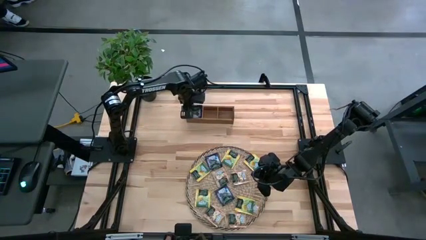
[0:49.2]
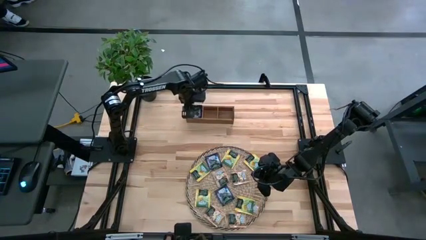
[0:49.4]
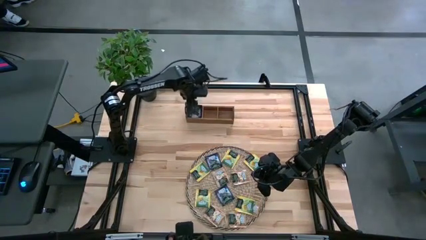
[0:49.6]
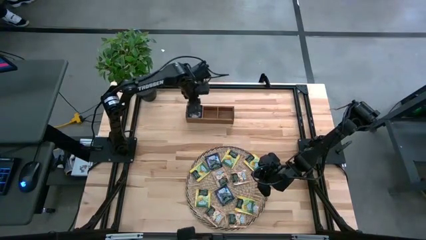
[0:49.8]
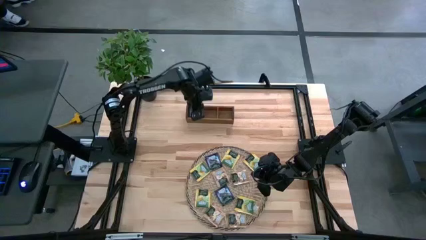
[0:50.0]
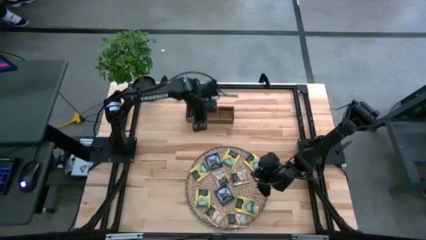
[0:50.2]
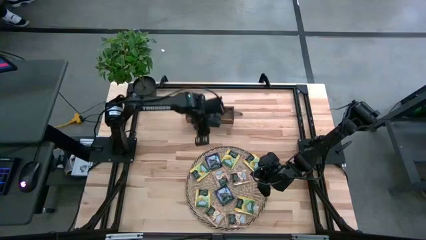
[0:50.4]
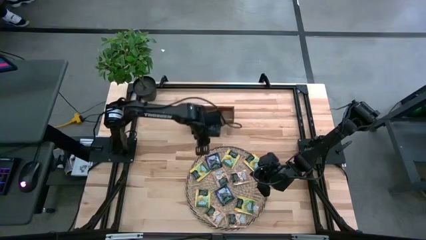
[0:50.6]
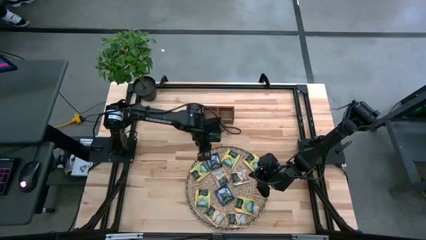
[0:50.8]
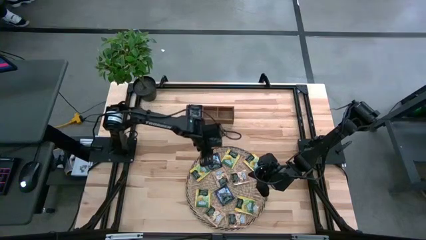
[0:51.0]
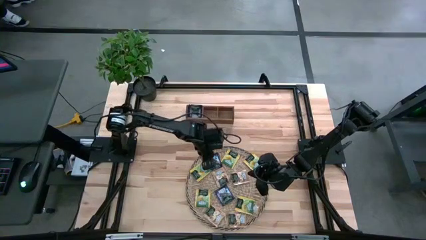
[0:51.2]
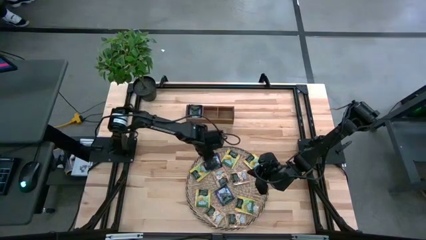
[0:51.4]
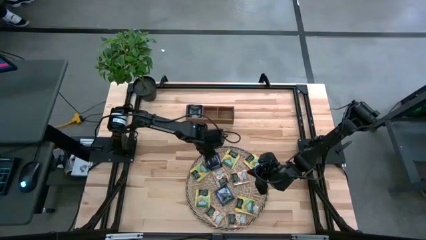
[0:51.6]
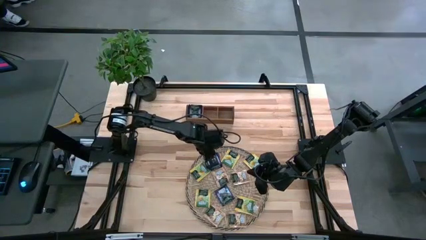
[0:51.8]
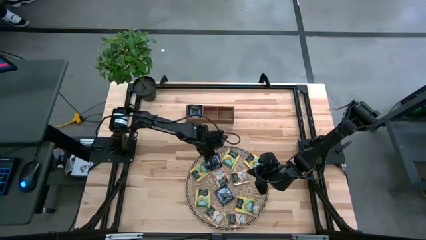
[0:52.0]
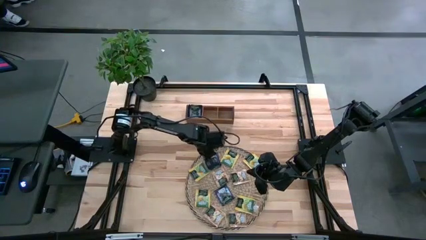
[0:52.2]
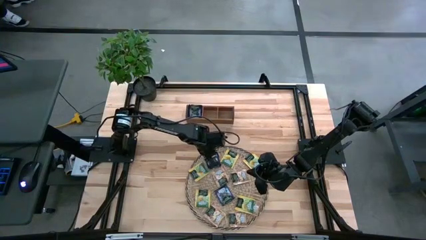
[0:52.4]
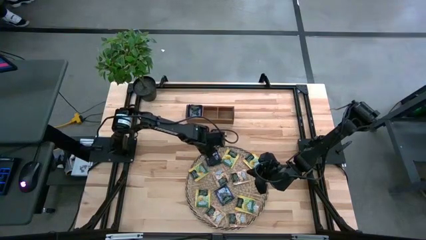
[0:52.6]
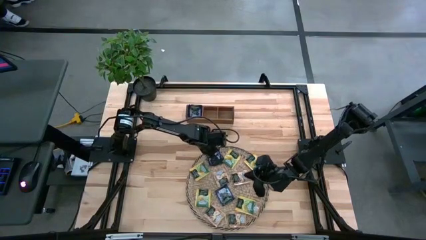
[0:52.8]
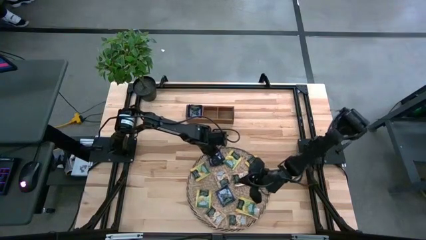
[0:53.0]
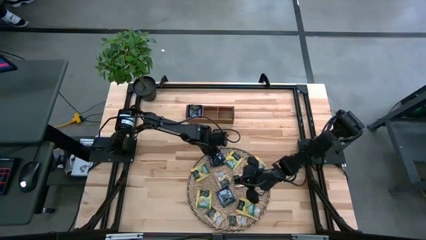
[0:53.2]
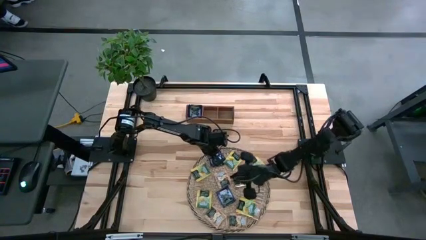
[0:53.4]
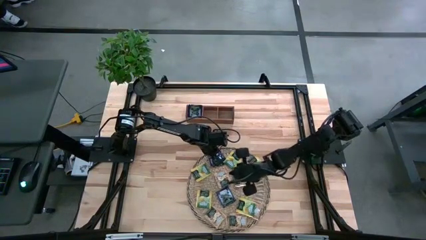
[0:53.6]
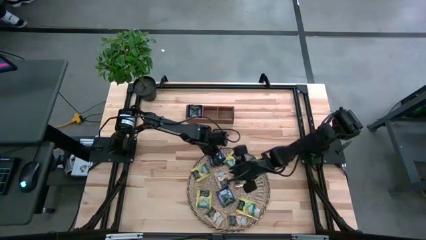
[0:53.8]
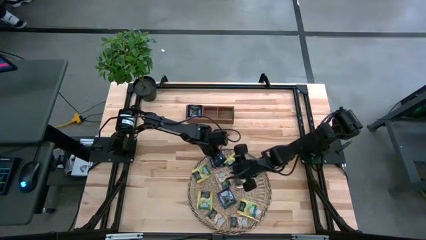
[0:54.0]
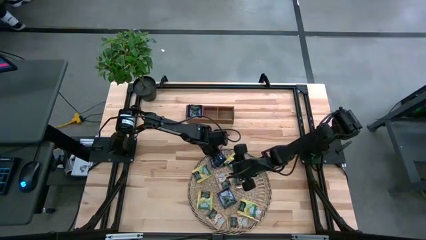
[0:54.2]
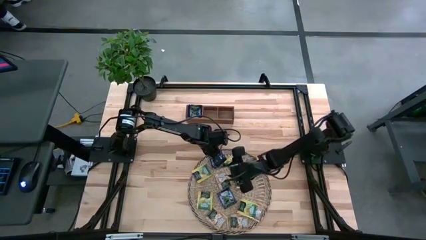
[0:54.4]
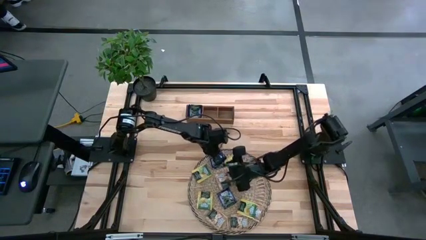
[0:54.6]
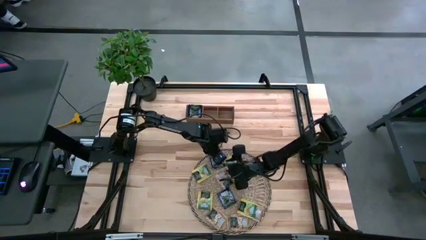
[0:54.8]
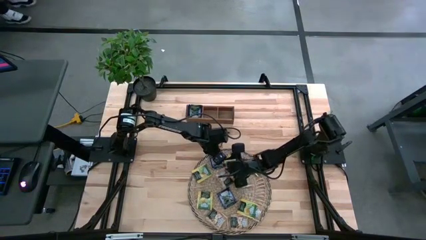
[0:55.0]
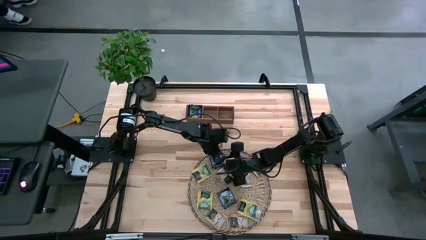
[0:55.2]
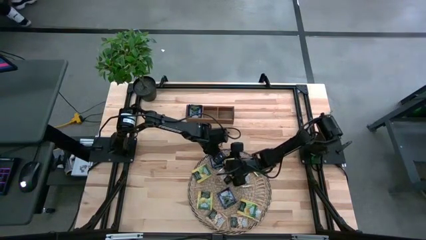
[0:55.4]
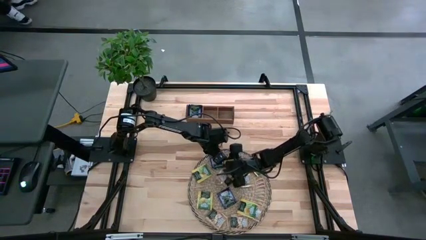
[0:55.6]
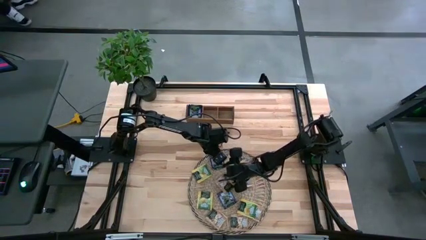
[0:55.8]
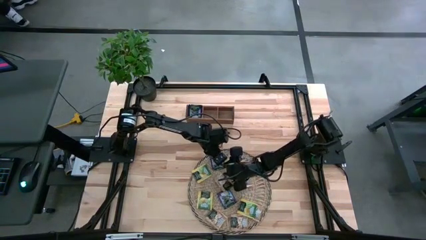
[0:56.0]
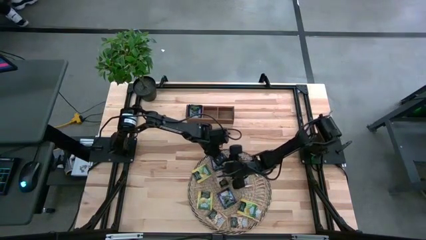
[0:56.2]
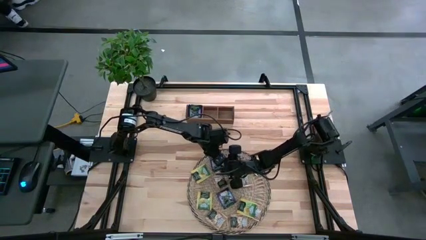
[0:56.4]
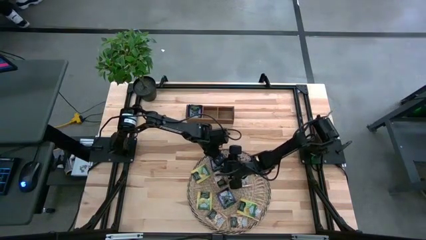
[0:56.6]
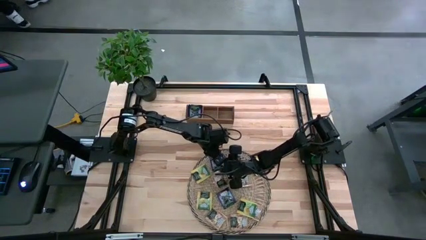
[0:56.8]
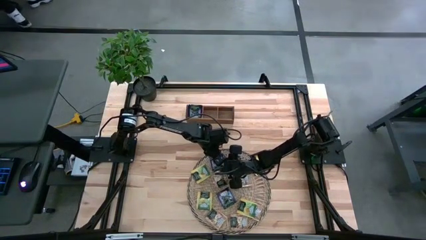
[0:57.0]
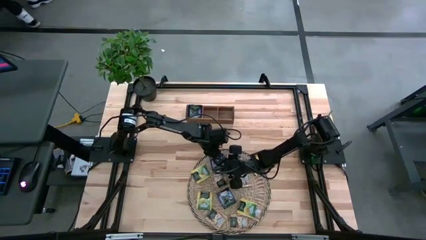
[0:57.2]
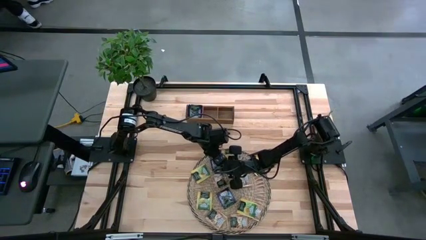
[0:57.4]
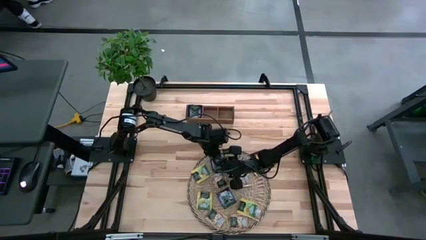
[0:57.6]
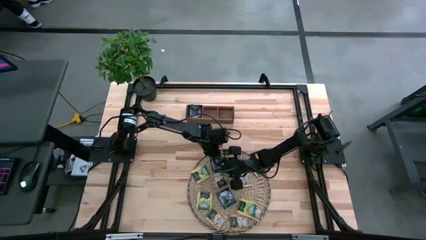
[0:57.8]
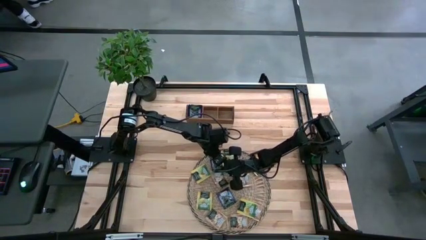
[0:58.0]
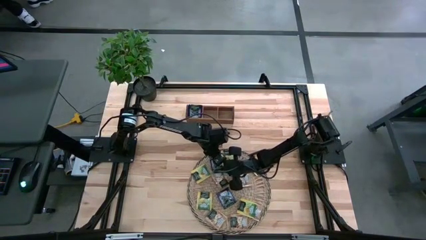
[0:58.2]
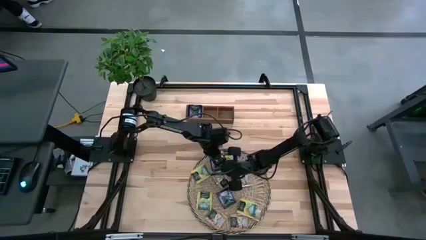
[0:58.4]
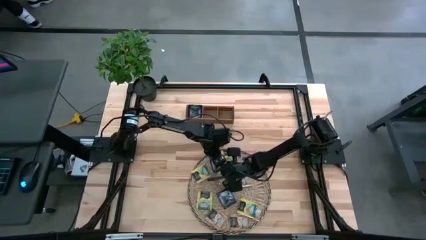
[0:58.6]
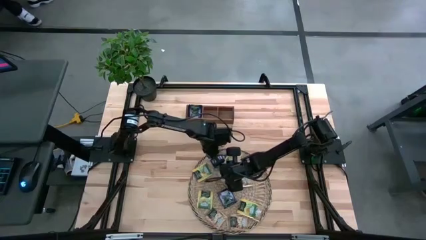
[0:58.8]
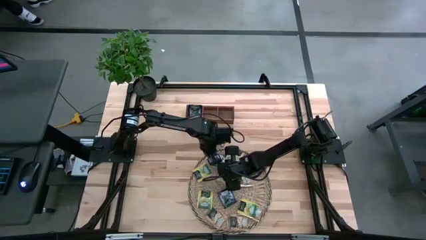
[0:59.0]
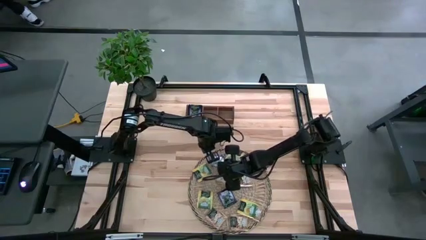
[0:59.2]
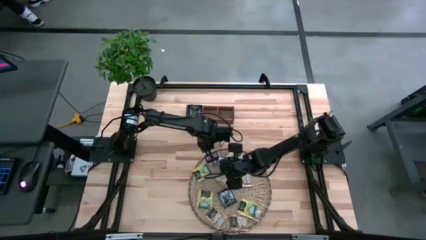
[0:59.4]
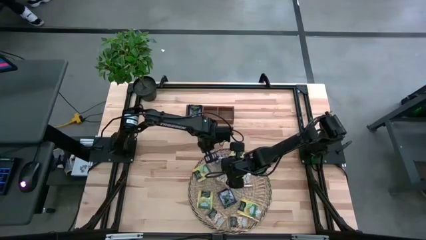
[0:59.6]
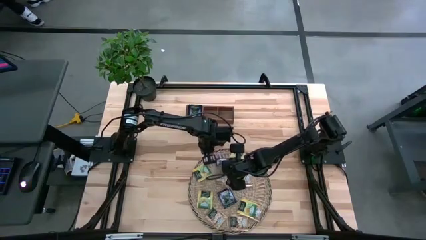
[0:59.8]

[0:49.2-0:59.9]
Task: Pick & Place Tea
Put the purple tea bag in the left section of the wooden organizer

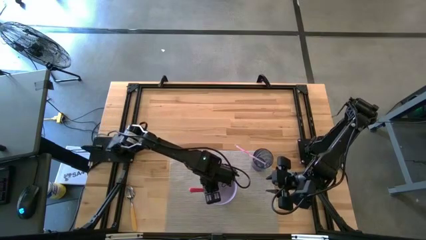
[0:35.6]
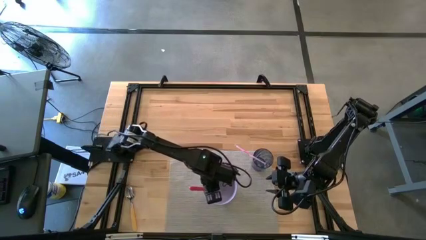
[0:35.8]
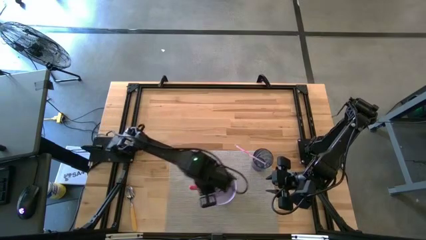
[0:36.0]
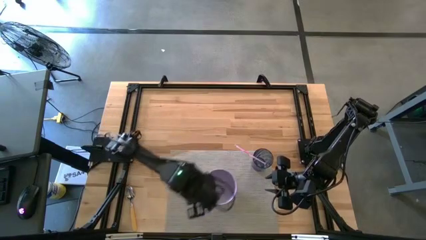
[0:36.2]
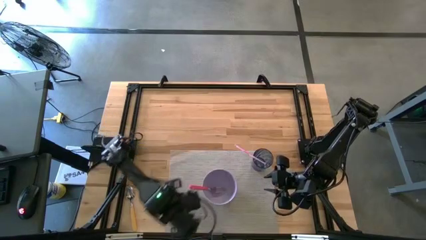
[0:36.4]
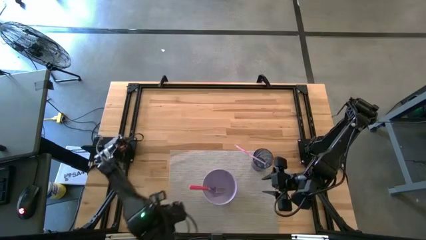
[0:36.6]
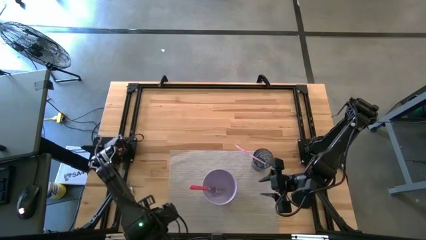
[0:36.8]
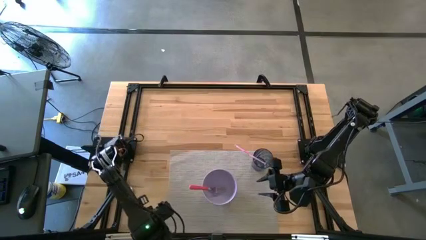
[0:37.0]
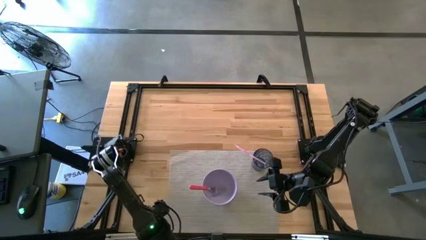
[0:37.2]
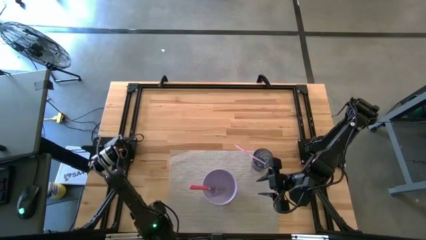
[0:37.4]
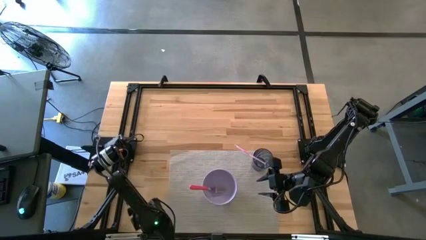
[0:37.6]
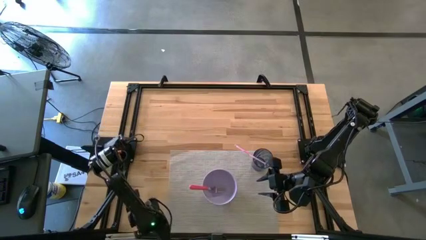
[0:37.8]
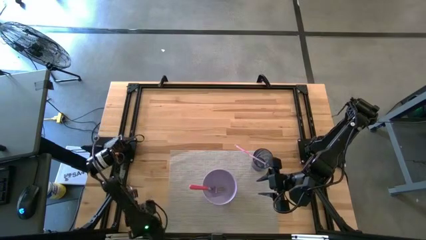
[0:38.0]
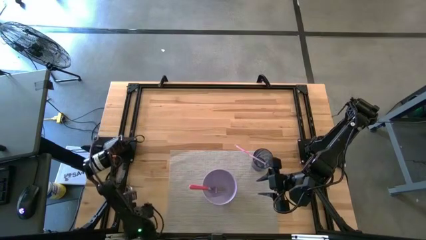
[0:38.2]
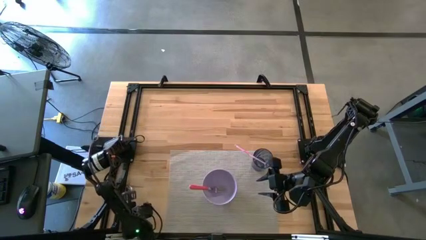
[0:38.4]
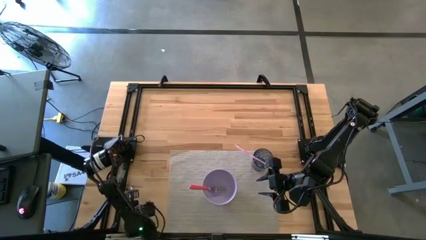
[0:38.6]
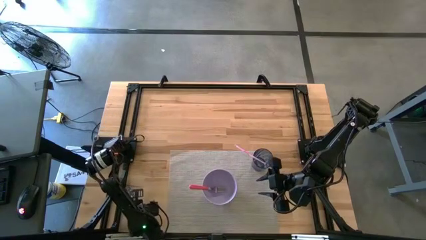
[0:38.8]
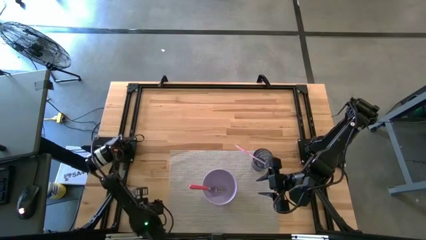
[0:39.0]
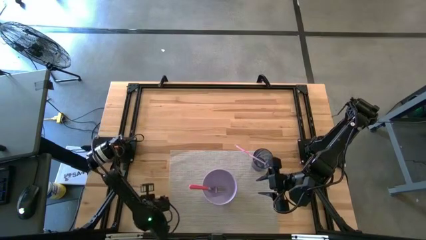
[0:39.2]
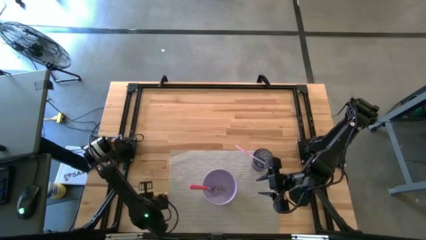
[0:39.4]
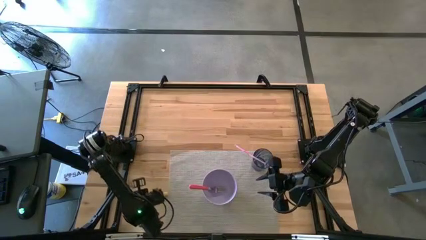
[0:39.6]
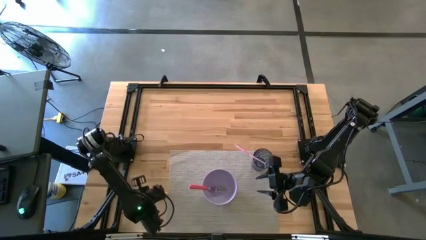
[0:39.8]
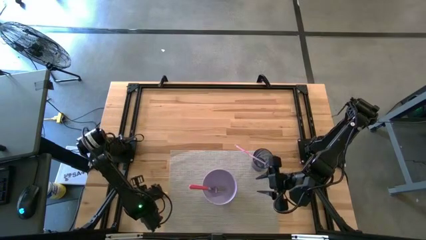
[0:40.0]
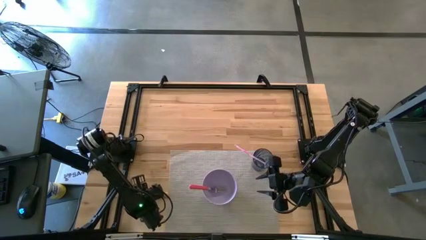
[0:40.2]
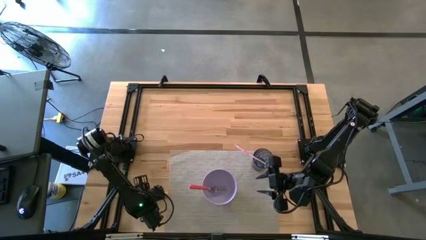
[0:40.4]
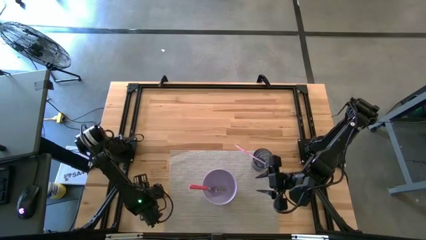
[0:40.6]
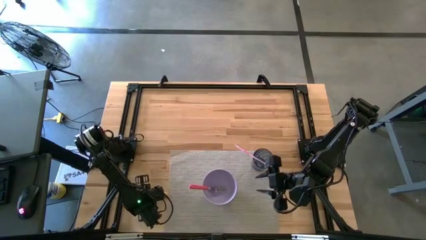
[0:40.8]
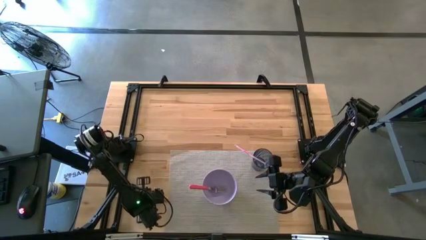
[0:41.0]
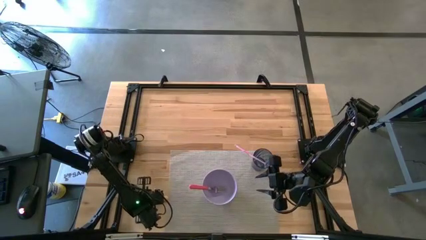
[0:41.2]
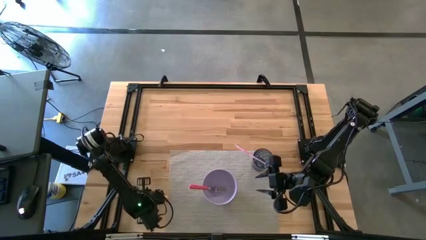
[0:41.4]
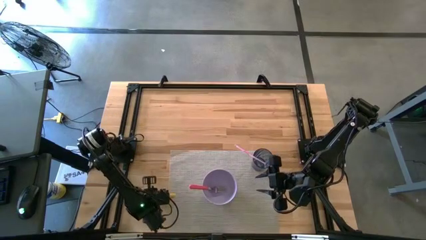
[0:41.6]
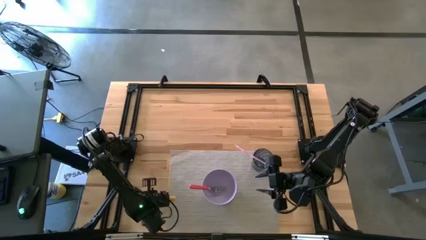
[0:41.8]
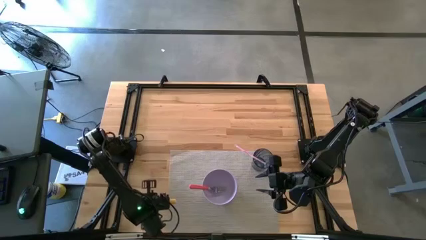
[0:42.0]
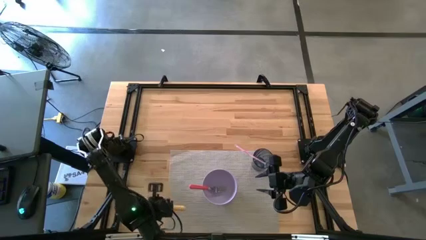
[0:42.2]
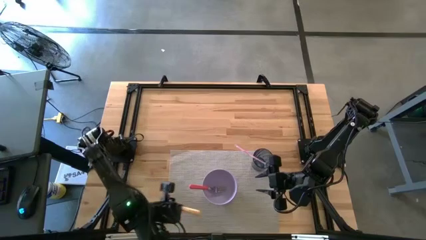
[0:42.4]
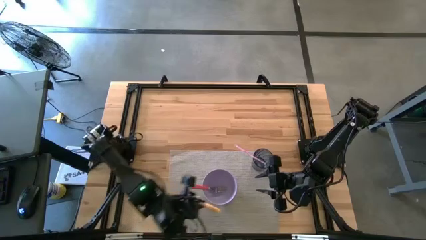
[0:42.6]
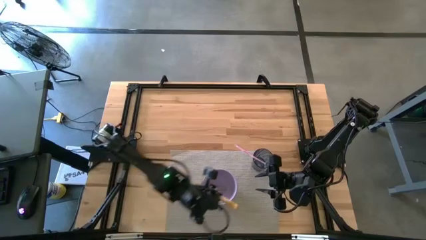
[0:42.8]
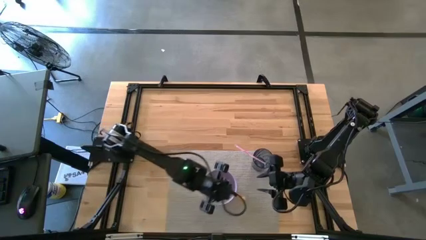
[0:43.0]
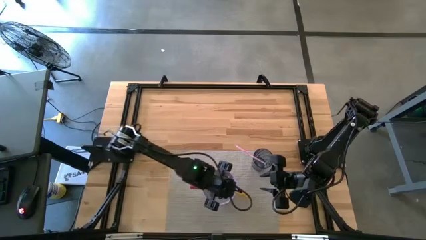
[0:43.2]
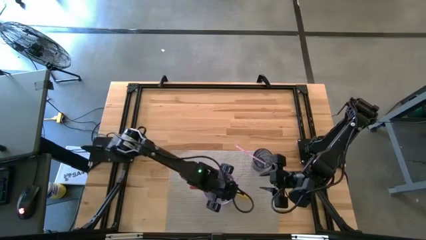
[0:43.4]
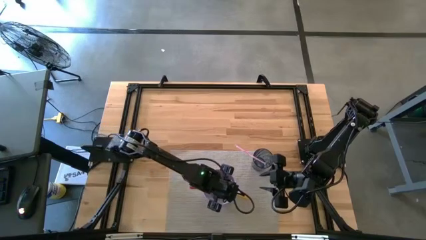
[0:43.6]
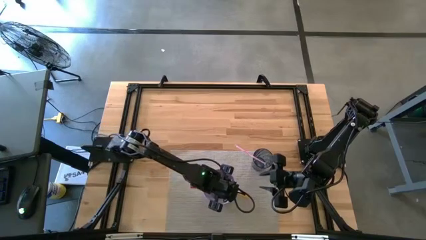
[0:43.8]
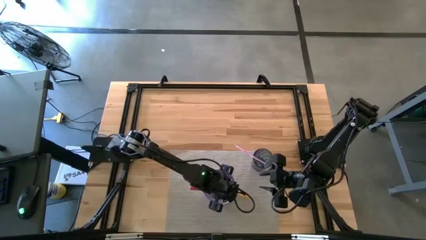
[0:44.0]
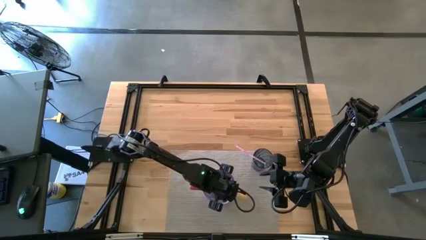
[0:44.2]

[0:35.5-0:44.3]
Task: Pick & Place Utensil
Put the yellow spoon into the purple bowl on the gray mat
